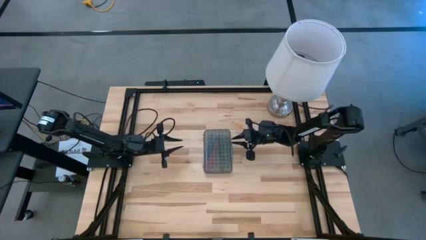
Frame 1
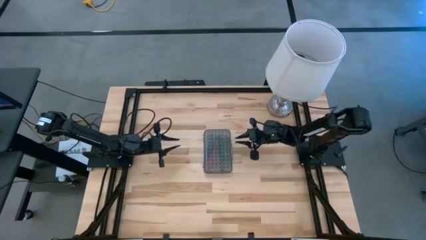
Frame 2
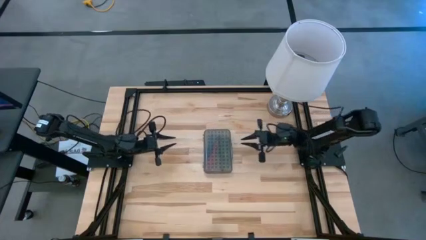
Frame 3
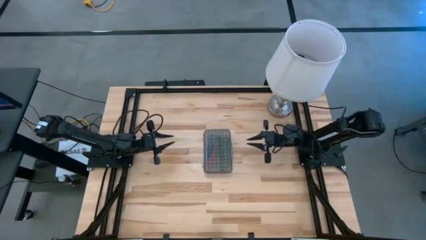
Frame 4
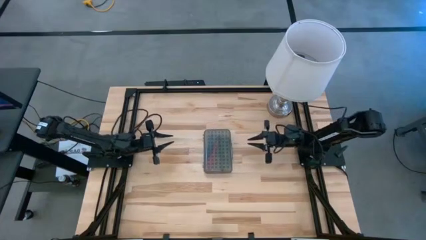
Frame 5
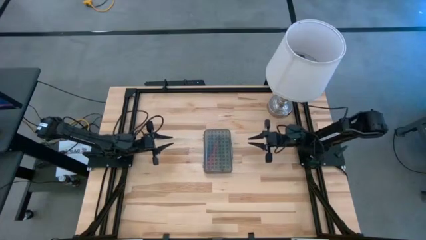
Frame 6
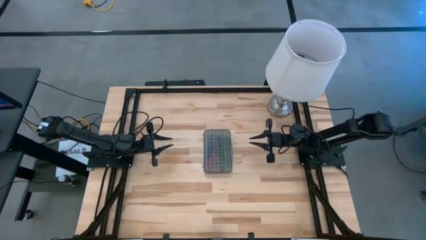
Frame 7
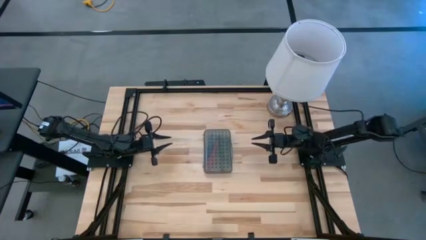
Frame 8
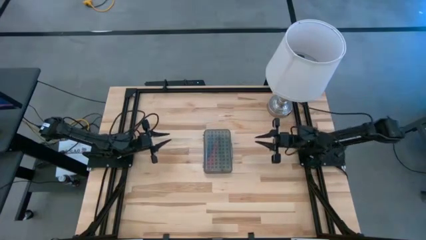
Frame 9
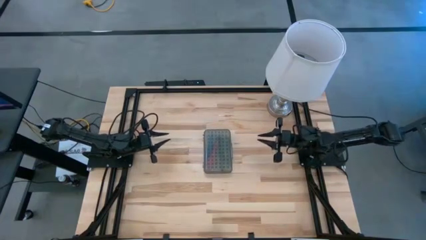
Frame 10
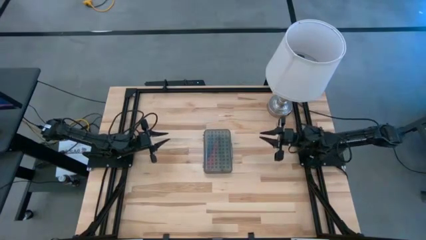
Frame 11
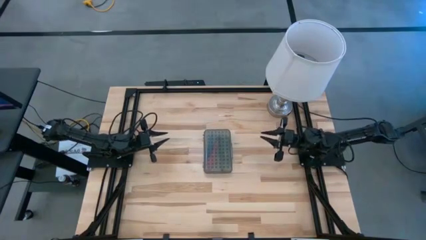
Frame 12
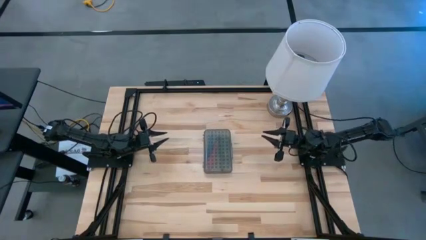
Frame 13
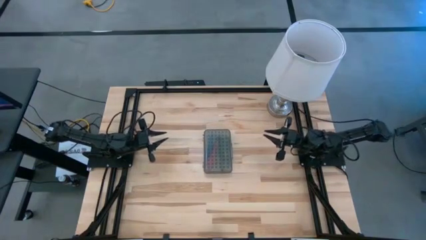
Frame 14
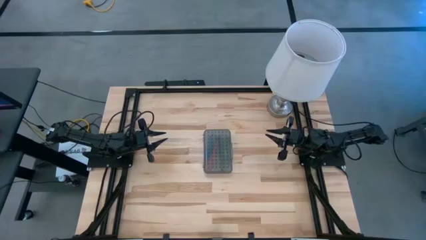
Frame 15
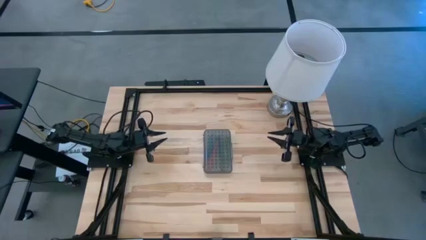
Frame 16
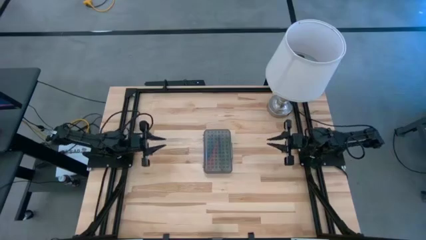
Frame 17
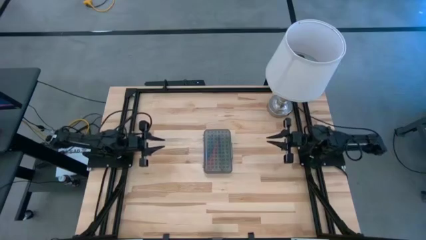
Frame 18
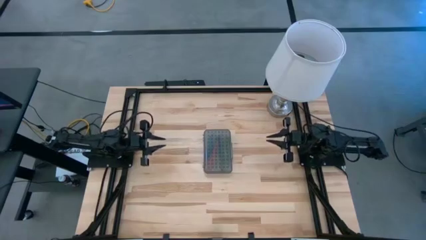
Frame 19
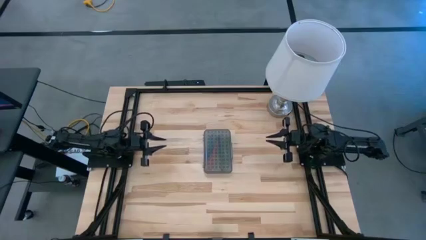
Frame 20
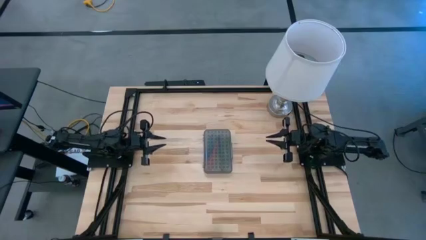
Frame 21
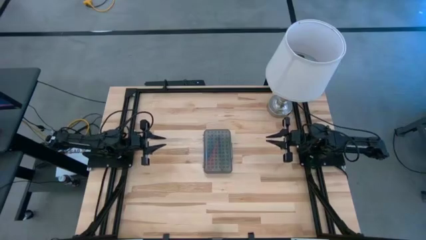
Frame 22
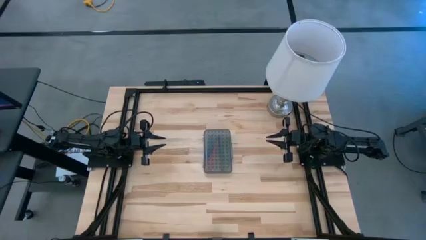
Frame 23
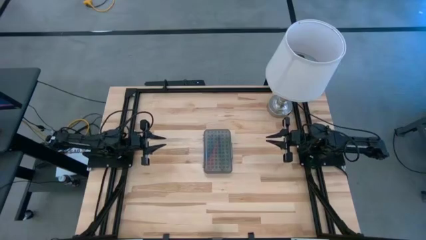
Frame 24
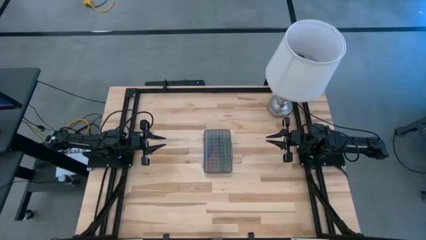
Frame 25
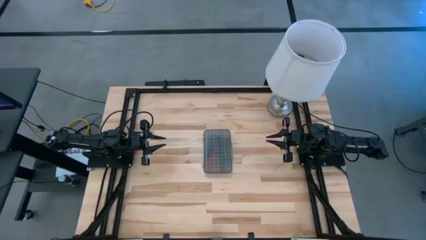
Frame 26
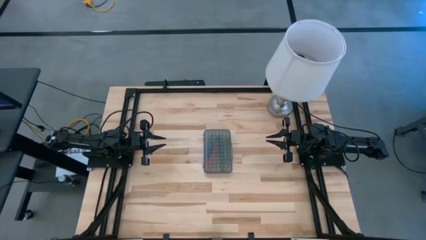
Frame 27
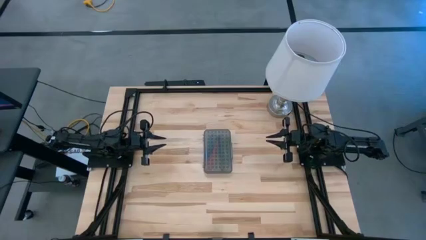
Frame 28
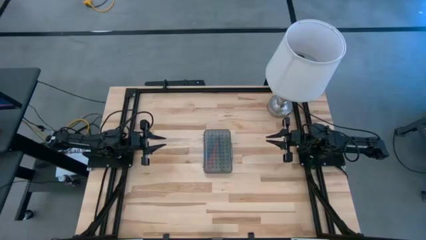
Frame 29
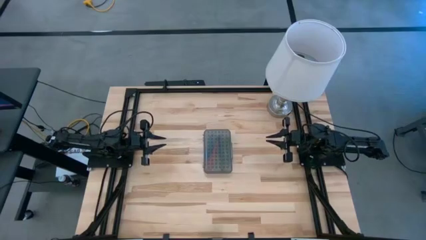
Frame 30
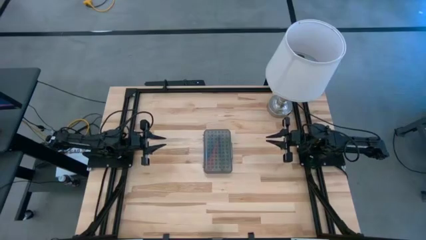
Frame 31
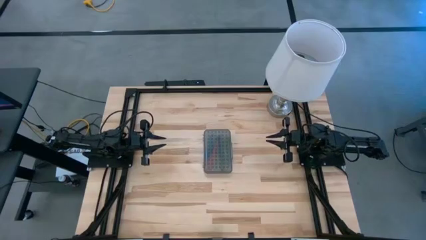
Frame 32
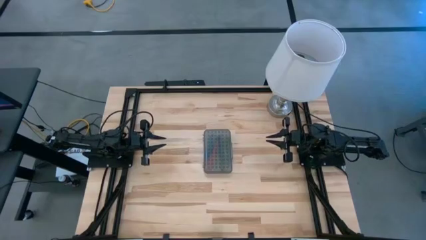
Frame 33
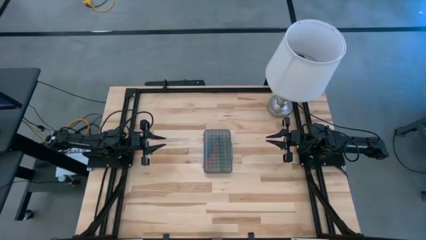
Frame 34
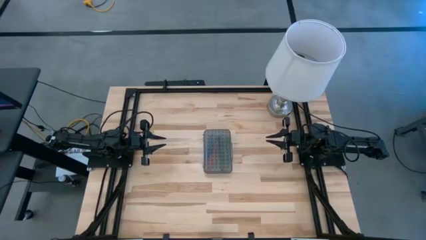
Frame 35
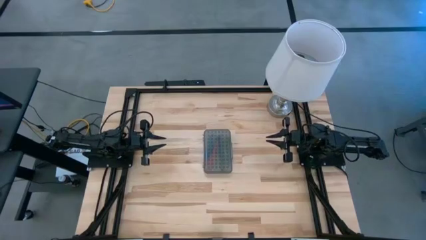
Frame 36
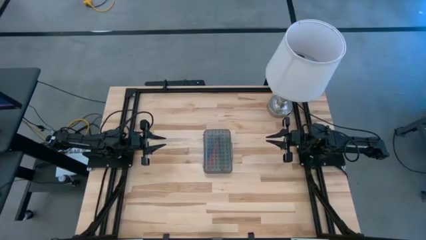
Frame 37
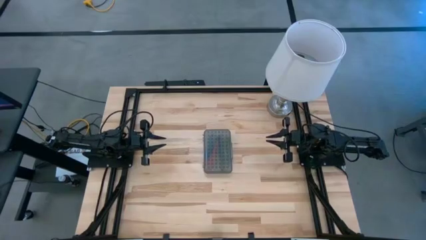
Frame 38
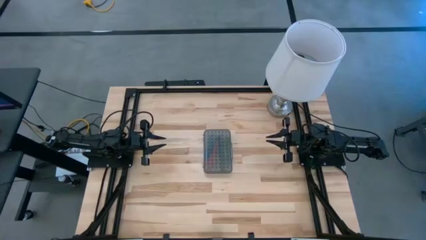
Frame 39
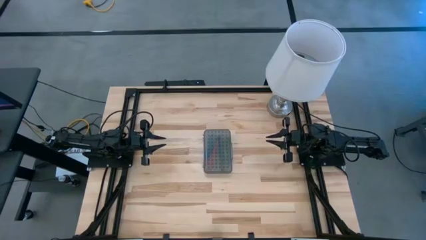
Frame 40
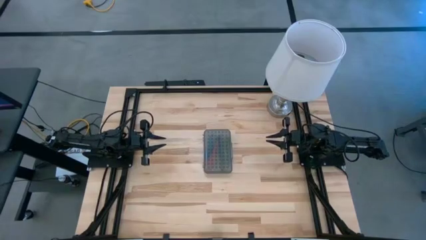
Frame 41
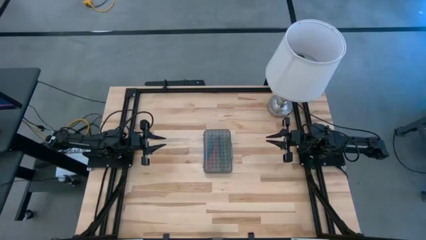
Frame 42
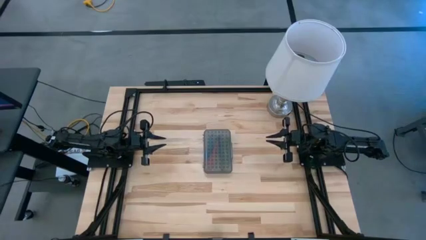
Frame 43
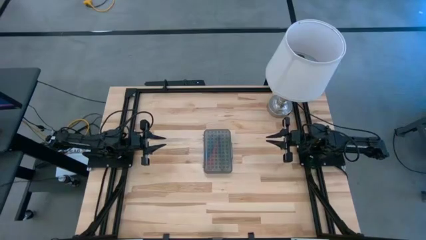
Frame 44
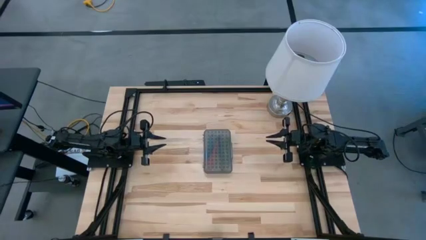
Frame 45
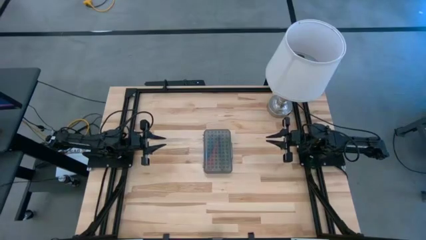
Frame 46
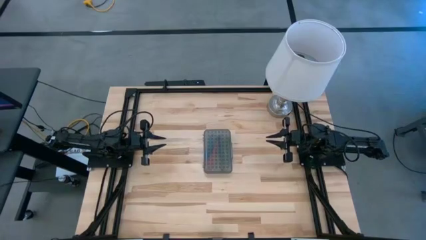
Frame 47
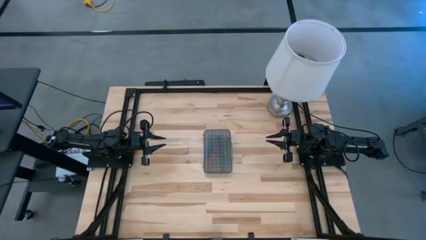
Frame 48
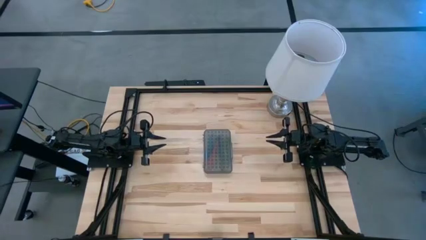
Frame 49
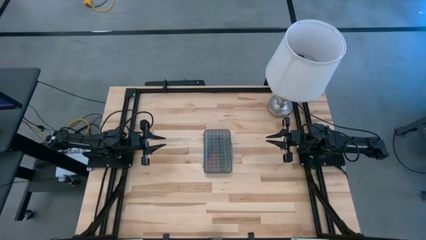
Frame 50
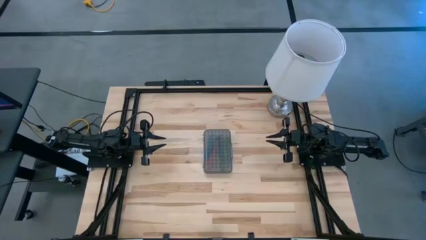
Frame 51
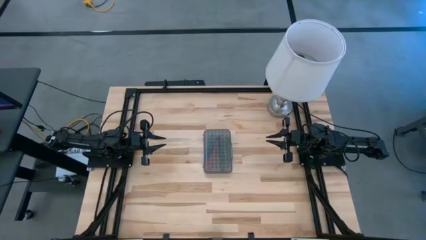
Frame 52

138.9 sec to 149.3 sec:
Task: Pick & place school supplies into a supply box
Return to Home Position

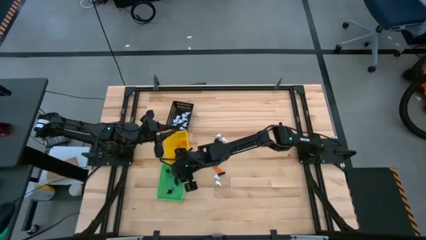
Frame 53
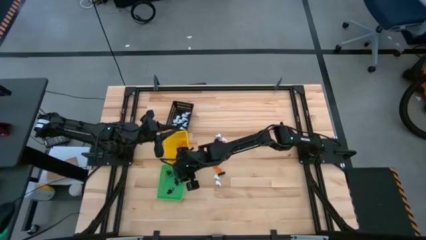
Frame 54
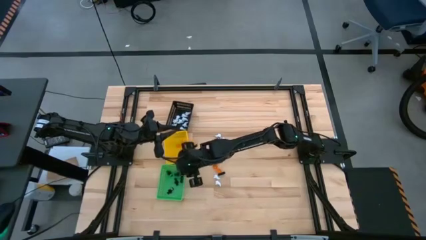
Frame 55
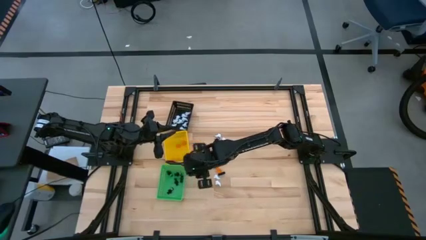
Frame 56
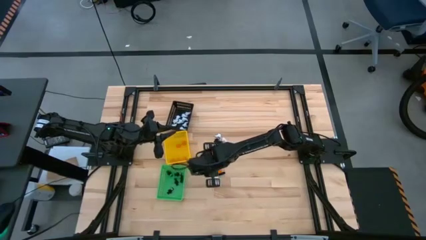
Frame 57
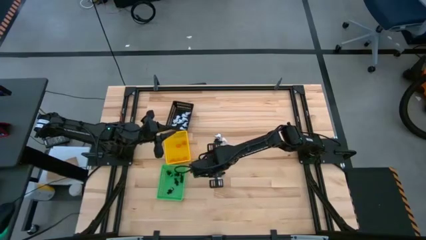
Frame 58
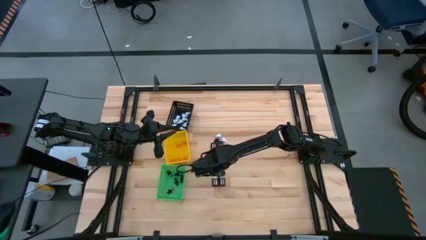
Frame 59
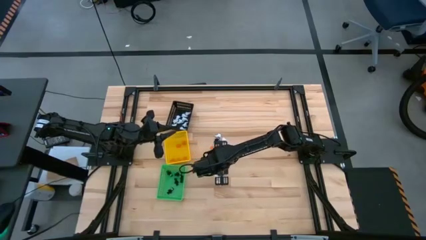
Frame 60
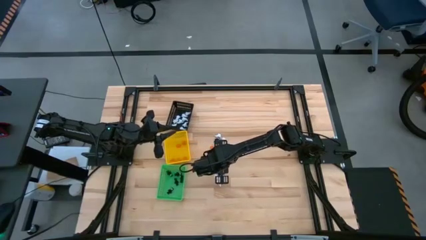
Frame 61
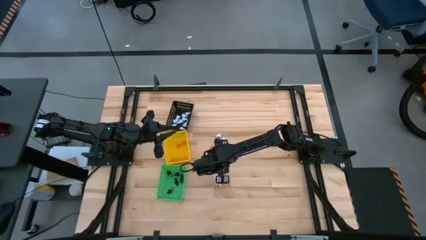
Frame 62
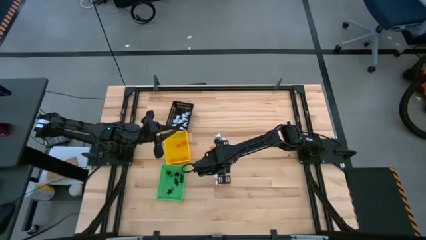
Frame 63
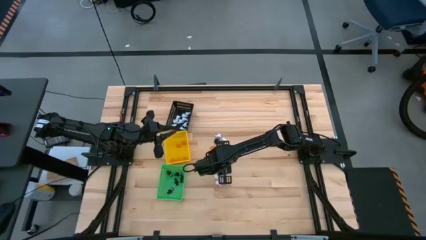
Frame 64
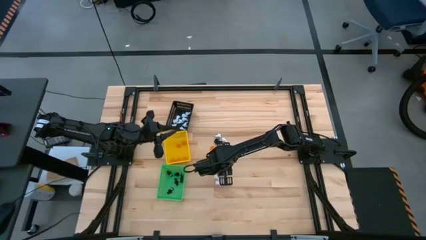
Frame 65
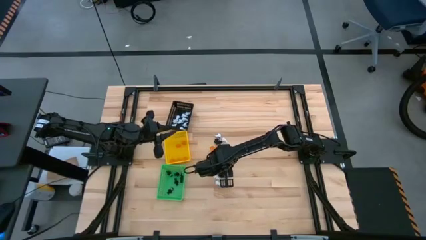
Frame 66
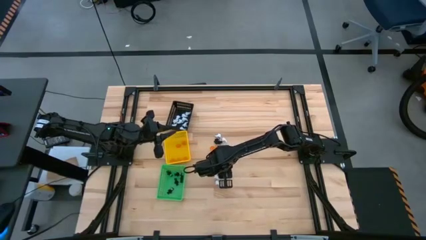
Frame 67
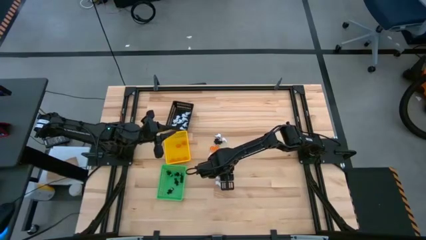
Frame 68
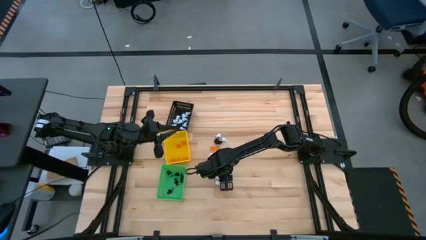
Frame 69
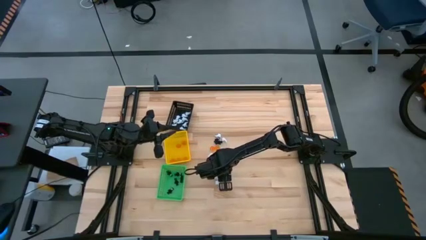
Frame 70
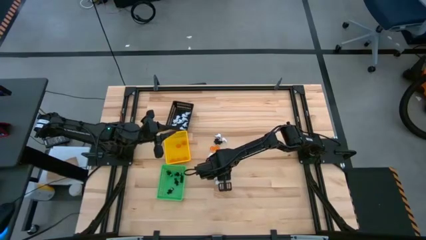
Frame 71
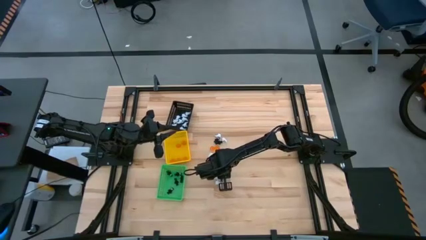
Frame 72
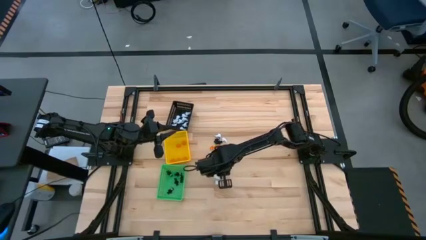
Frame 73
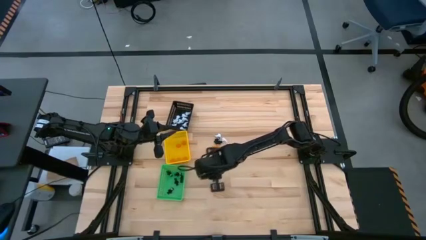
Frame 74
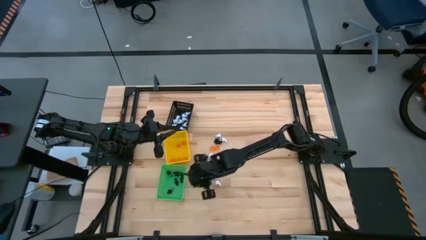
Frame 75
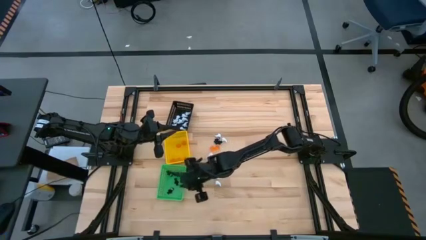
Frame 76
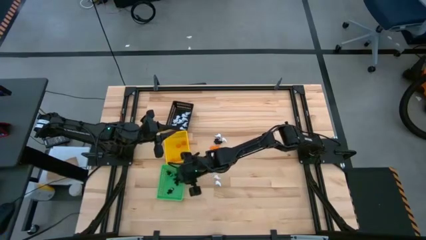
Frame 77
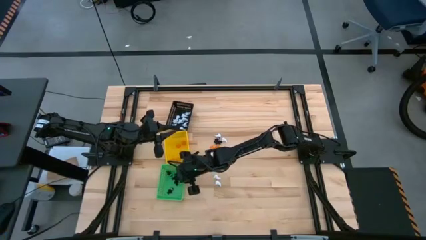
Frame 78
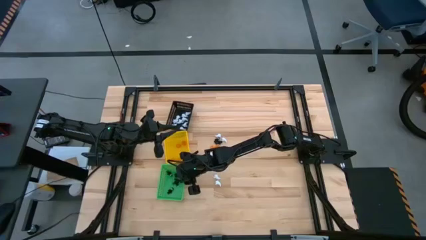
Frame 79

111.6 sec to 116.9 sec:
Task: Sort Halloween decoration
Put the black skeleton toy into the green basket

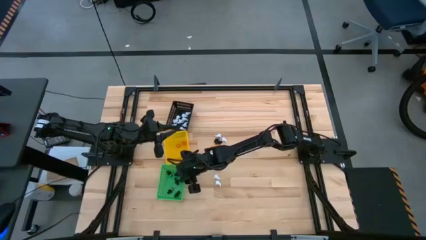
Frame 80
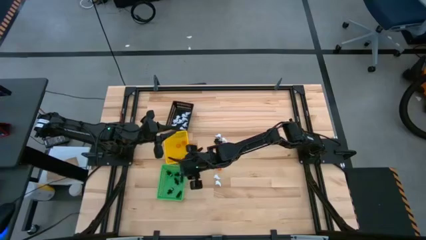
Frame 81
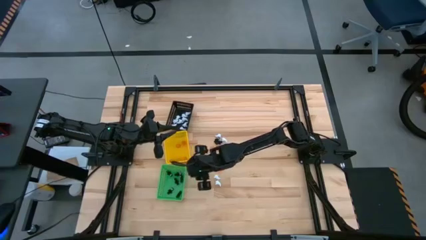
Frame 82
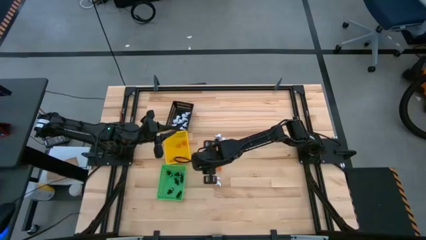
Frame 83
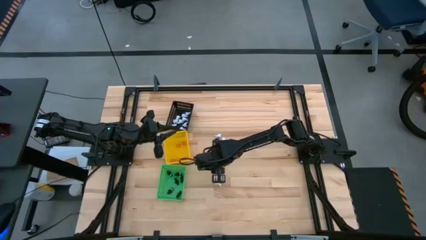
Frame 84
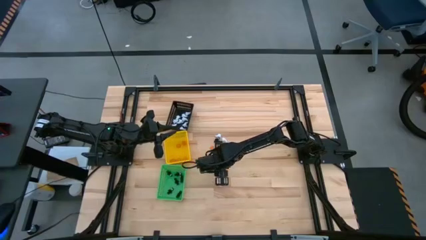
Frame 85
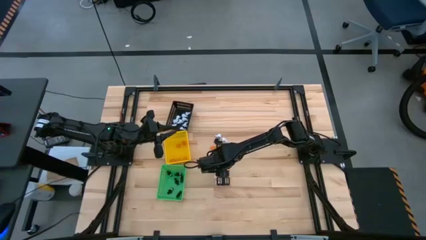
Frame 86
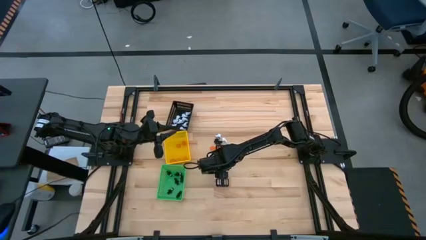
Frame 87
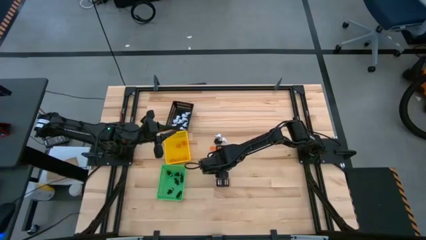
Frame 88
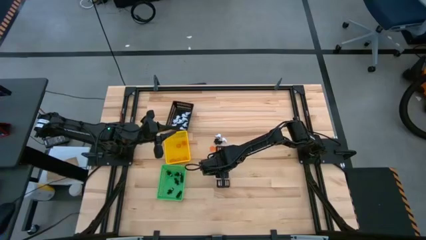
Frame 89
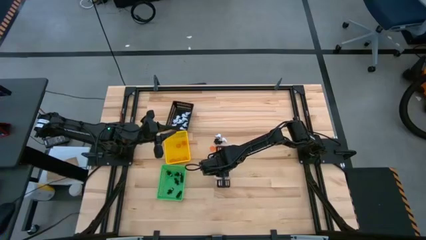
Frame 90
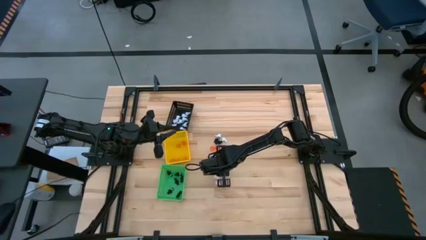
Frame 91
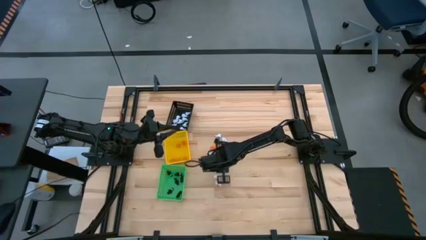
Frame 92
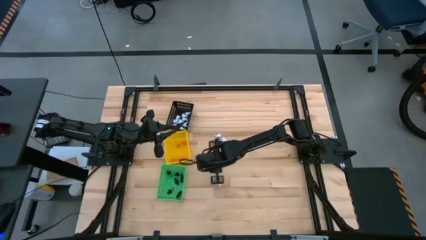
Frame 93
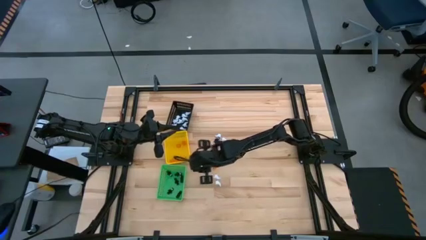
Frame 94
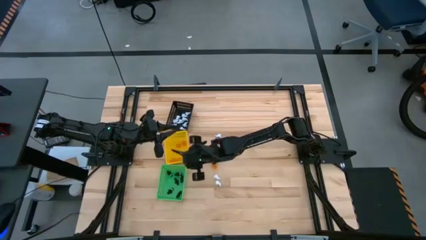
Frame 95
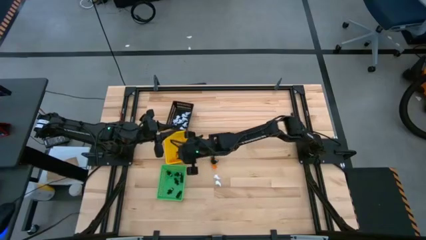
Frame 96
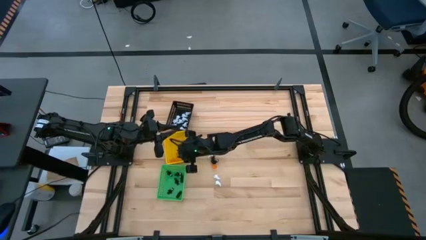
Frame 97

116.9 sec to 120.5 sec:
Put the orange pumpkin toy into the yellow basket
